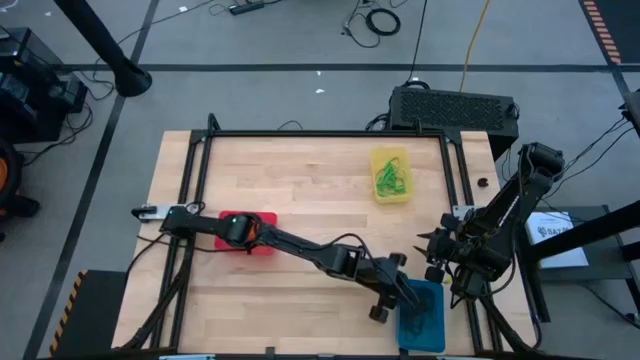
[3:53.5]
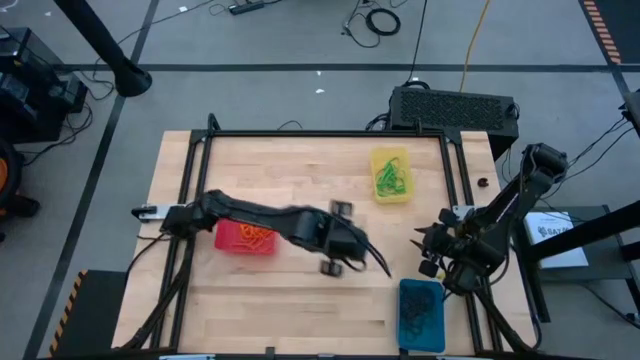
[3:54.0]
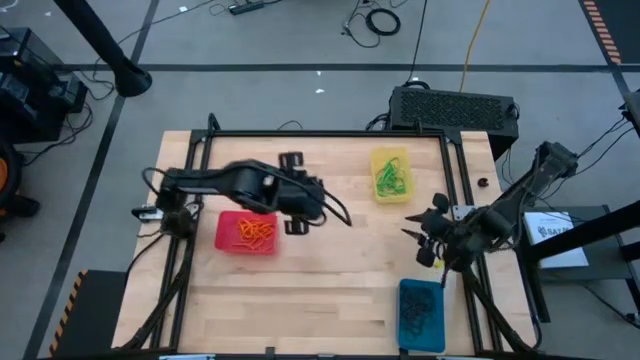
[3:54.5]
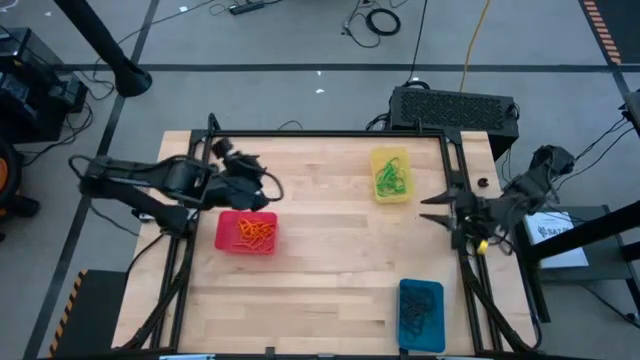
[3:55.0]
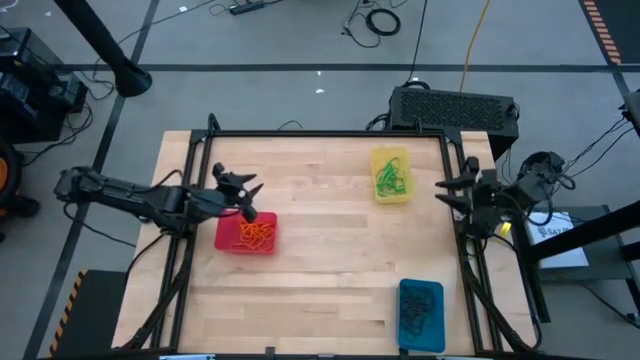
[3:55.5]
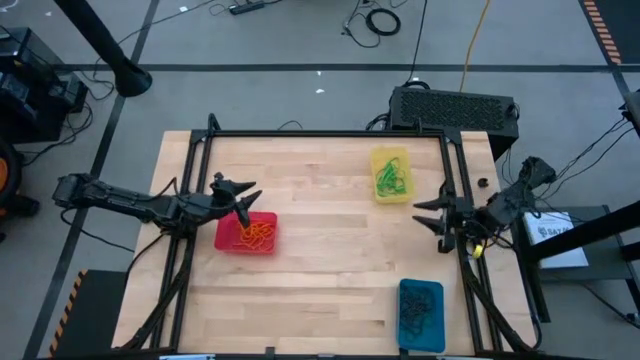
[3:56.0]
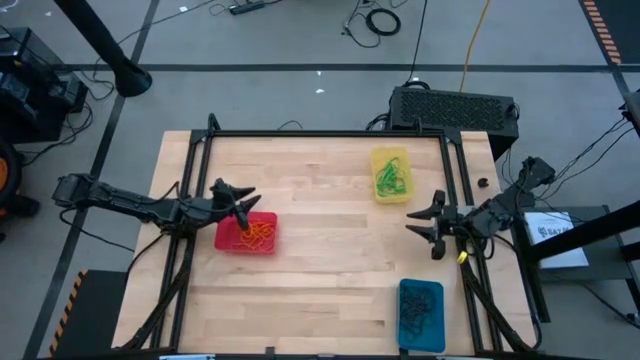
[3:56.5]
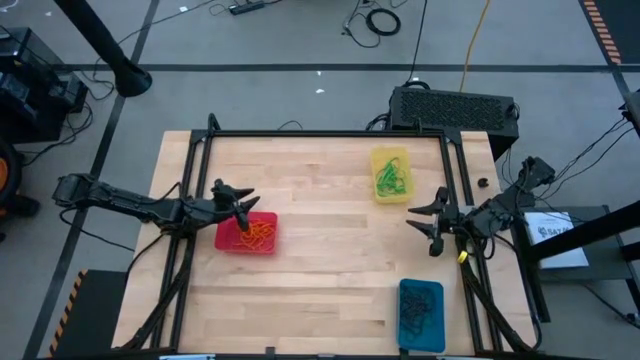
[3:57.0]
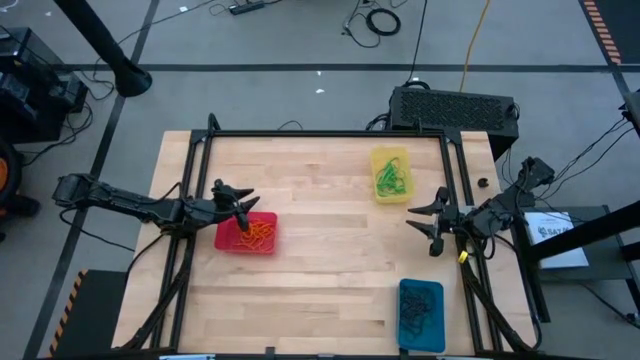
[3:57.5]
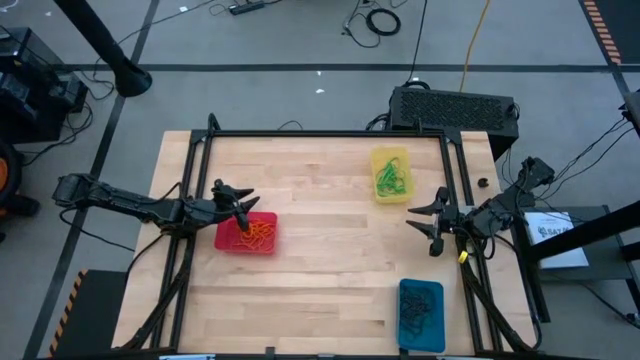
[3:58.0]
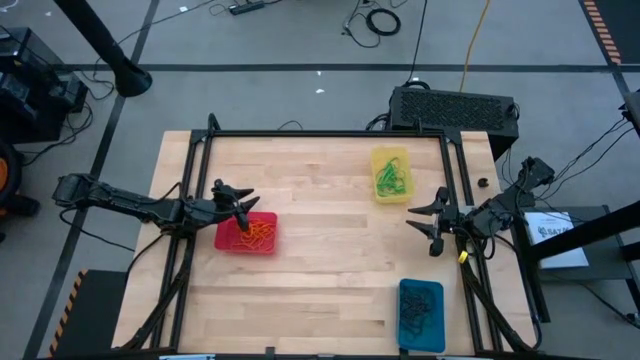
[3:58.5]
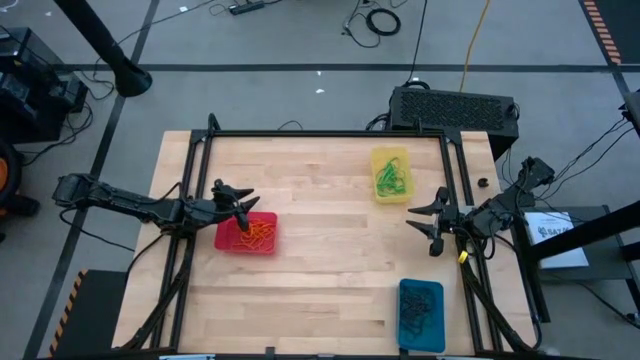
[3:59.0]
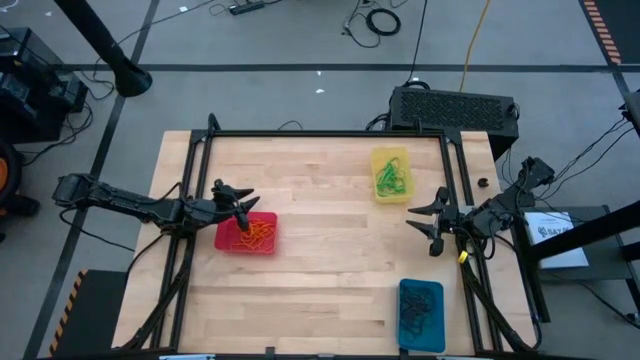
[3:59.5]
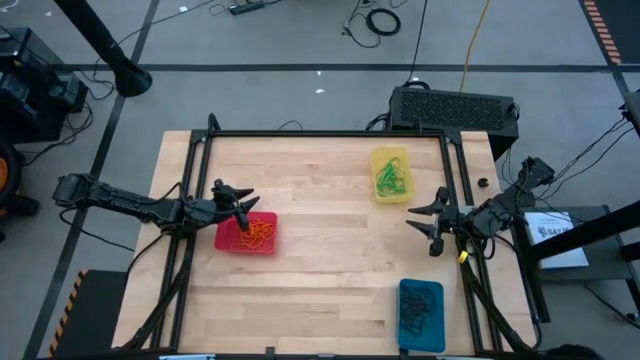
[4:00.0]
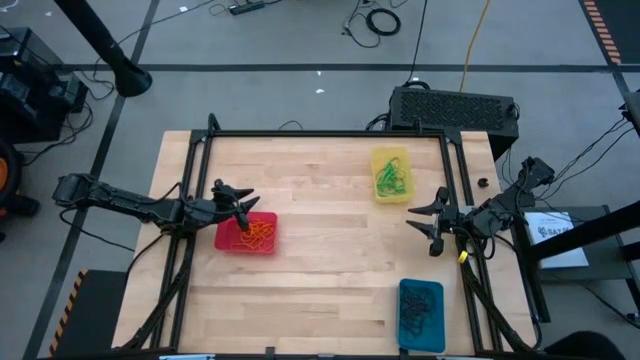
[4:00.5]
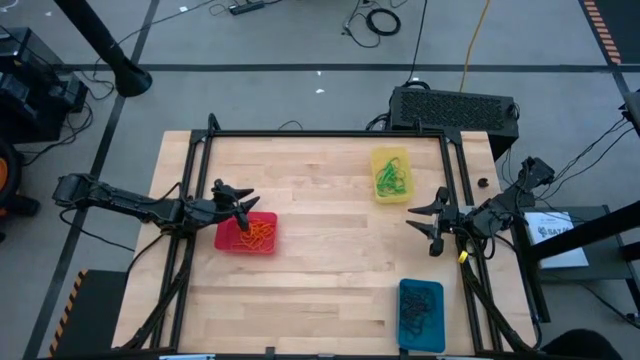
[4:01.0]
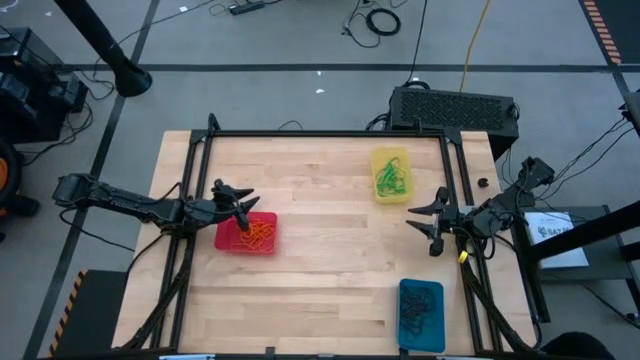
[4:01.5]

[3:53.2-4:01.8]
Task: Sort rubber bands into baskets
Return to Home Position

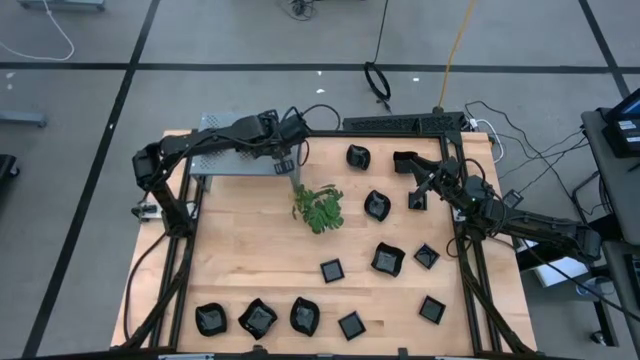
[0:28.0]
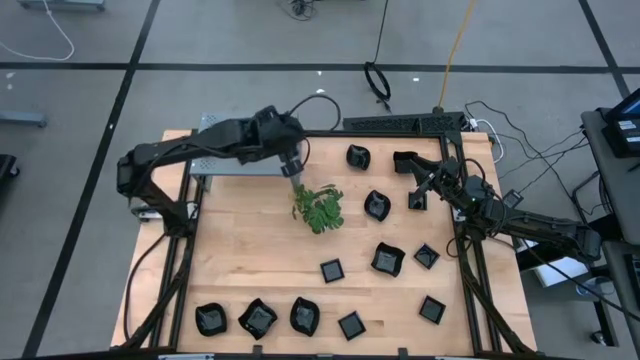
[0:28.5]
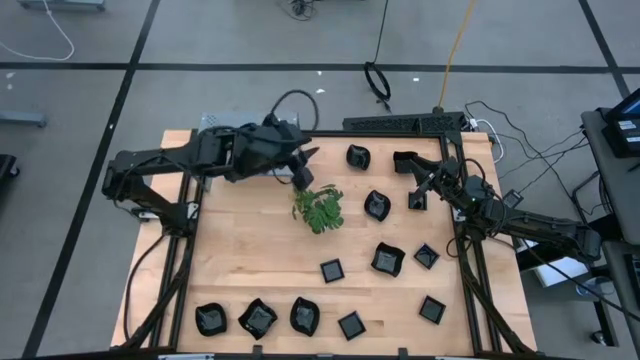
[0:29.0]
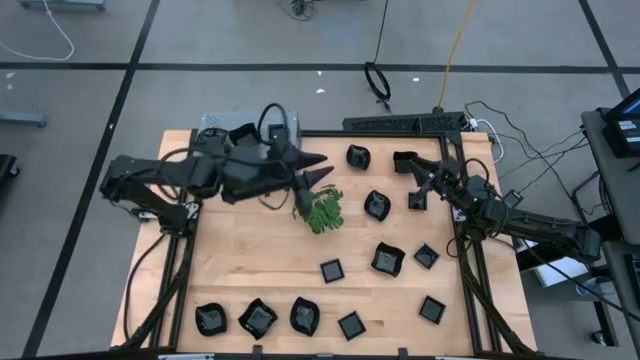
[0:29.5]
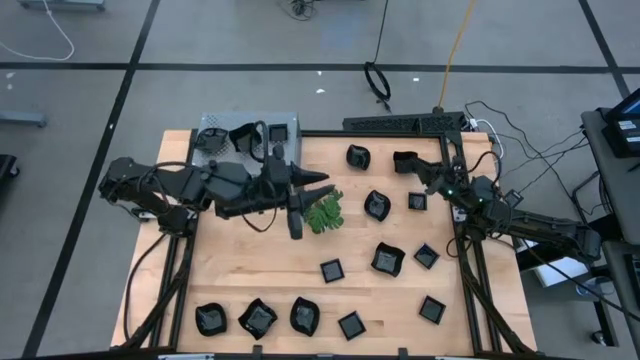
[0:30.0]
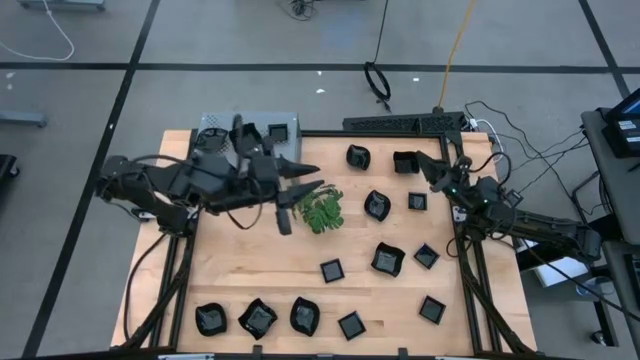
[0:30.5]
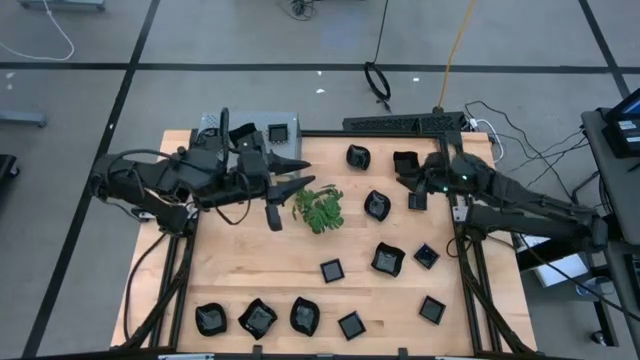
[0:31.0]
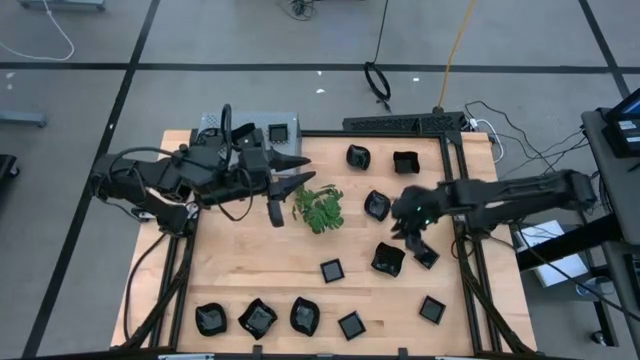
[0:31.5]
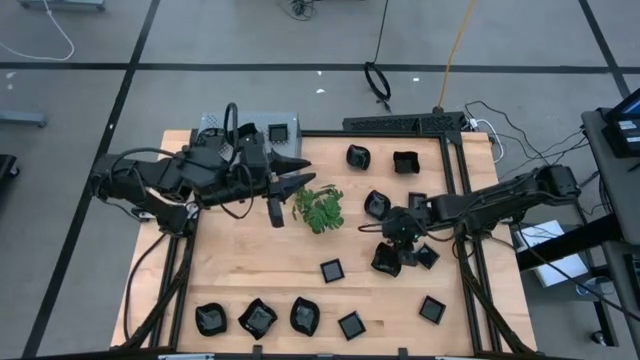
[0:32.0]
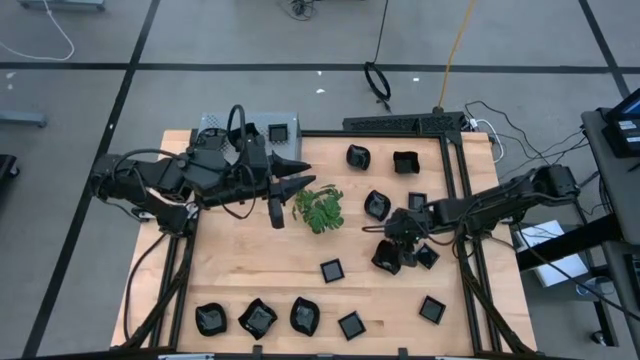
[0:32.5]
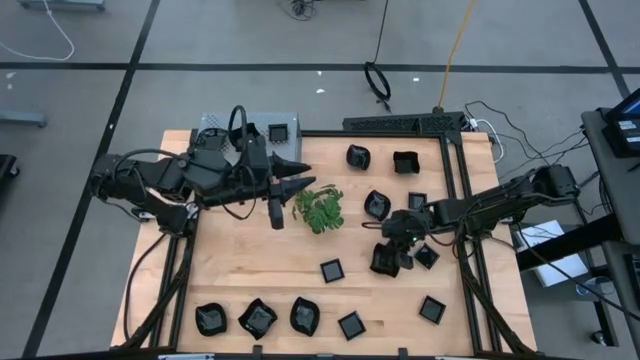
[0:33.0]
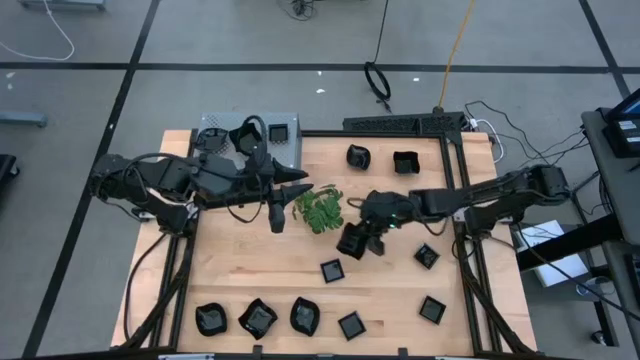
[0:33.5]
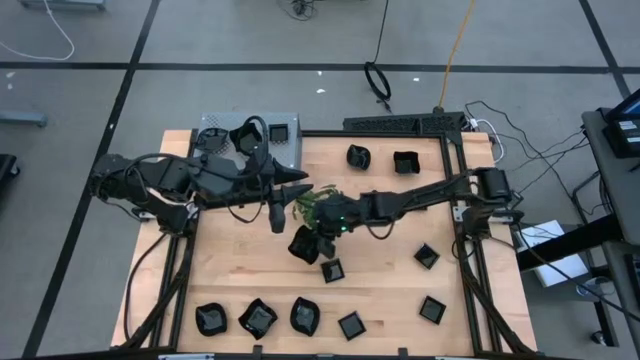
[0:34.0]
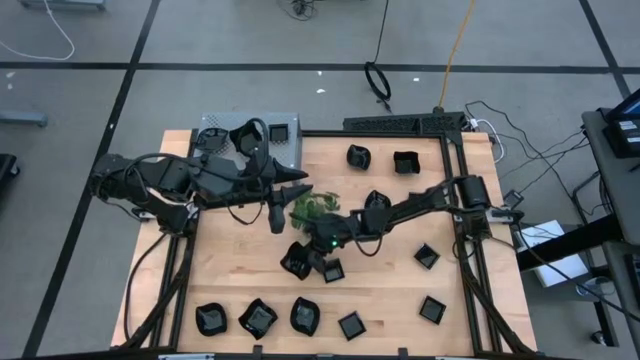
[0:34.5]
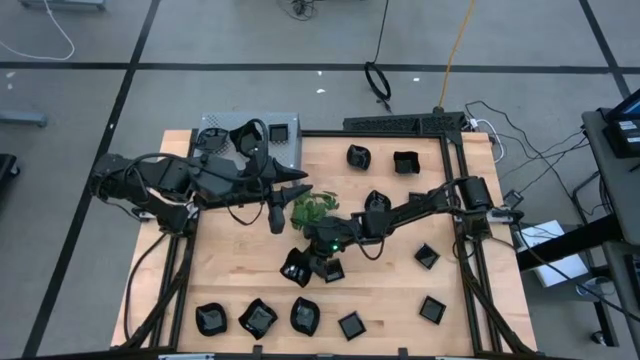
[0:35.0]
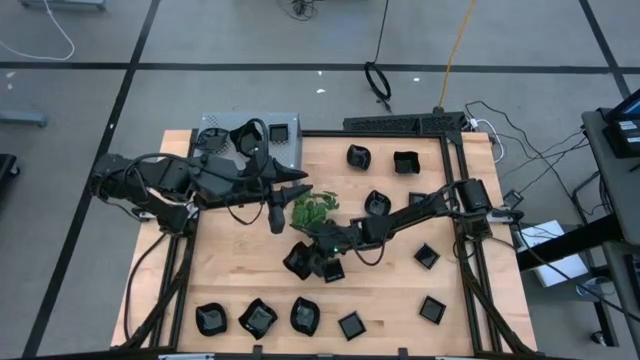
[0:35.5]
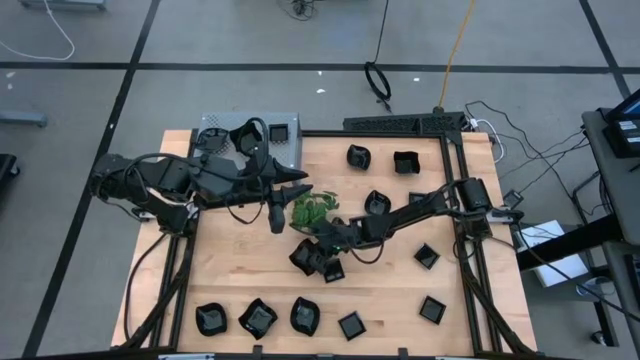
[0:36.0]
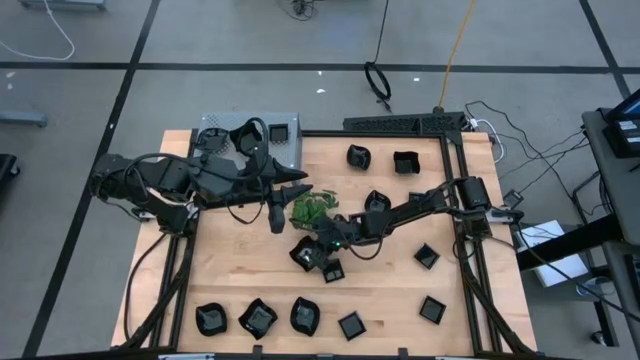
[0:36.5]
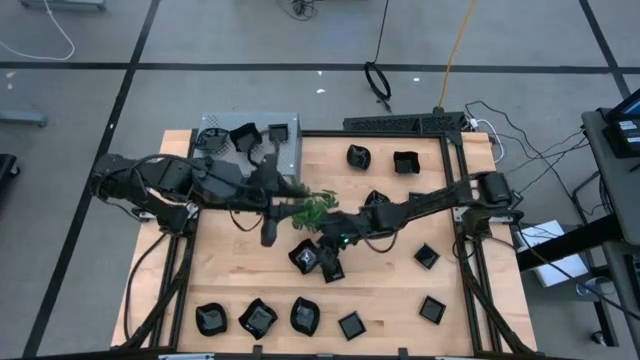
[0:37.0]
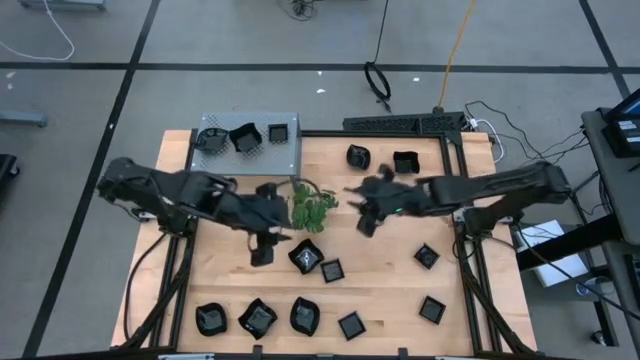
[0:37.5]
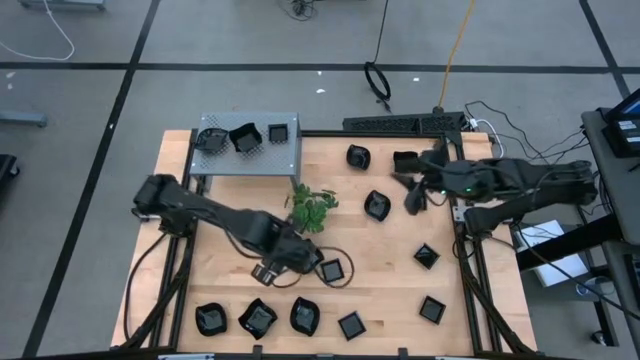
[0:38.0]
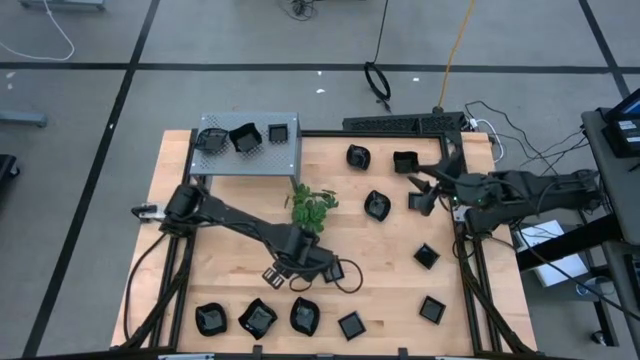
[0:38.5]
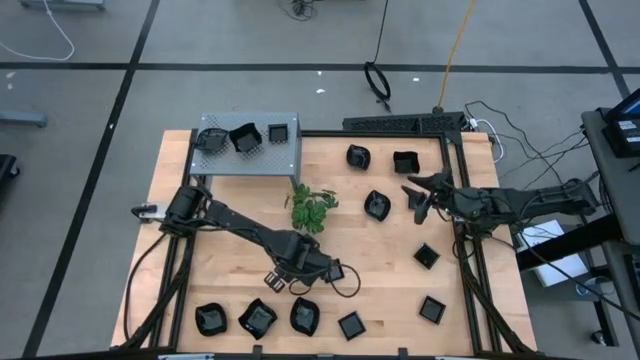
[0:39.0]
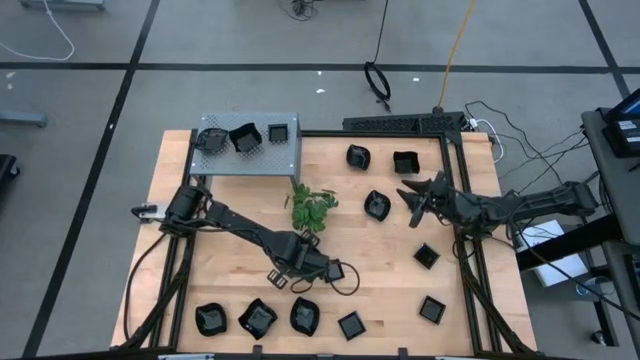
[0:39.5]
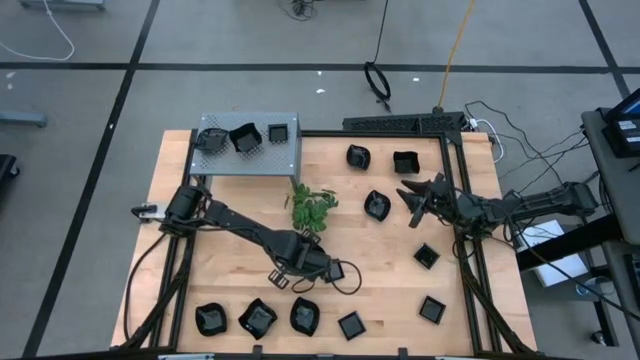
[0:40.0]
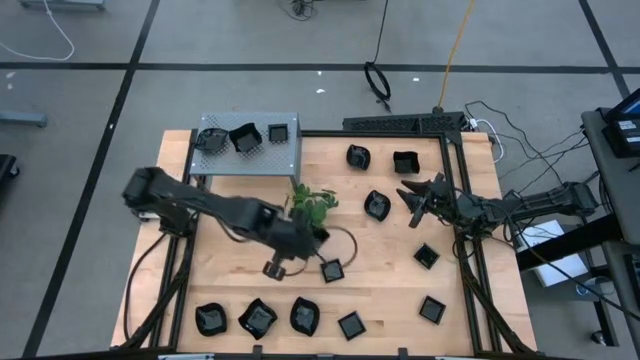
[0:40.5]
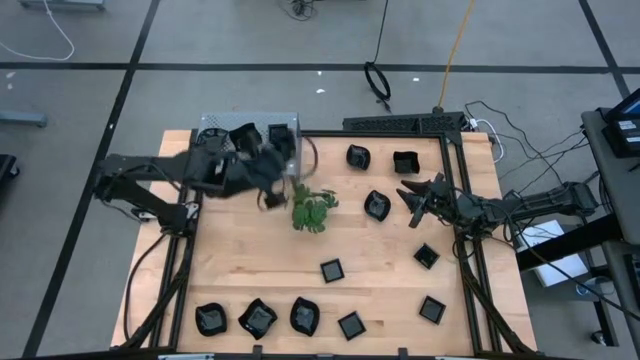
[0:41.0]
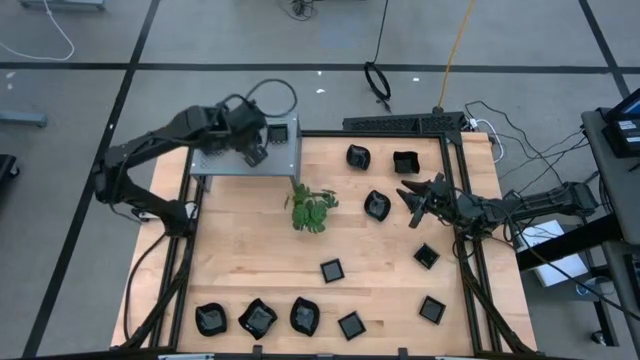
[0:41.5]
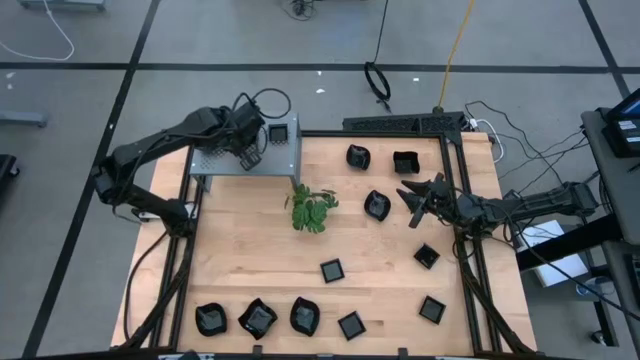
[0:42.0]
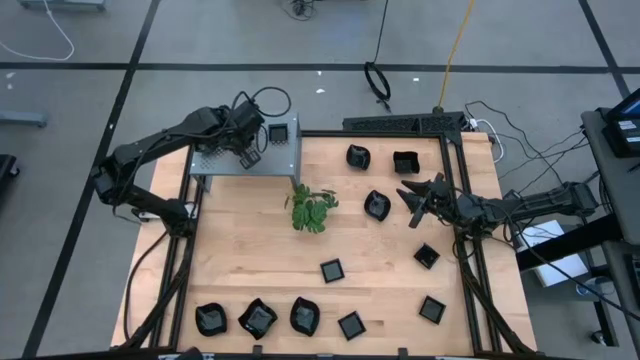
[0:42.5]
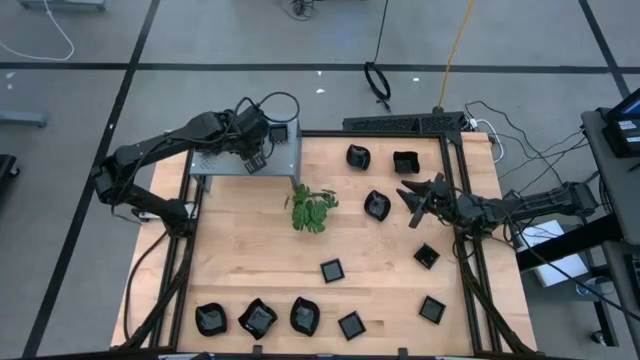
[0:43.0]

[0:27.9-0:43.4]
Task: Pick & Place Mini shaped plates
Stack the distorted square plate on top of the distorted square plate on the shelf
